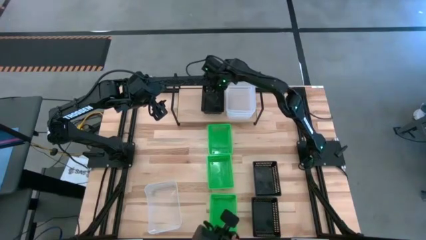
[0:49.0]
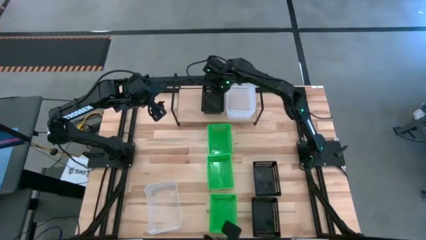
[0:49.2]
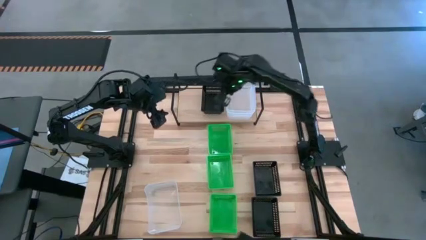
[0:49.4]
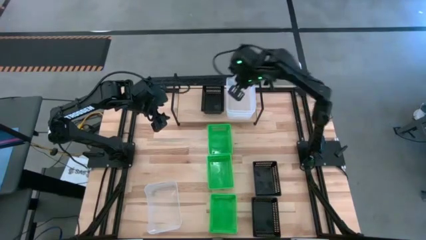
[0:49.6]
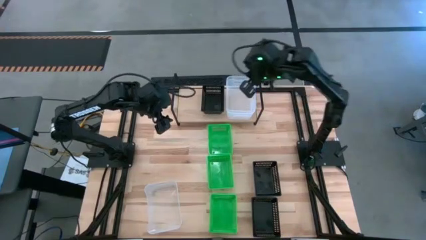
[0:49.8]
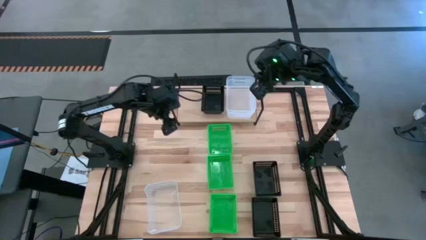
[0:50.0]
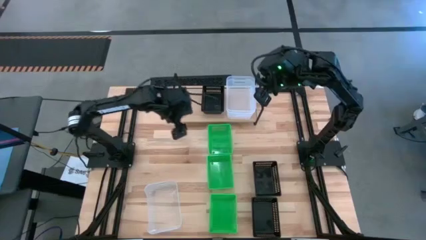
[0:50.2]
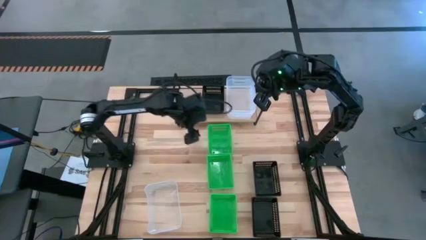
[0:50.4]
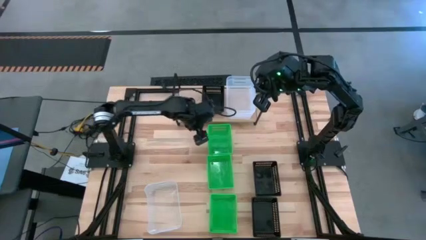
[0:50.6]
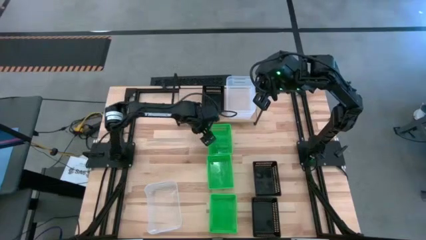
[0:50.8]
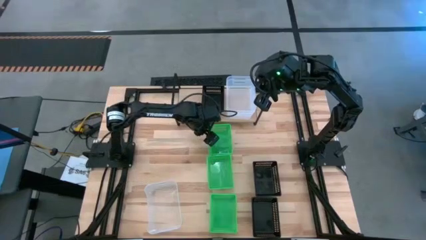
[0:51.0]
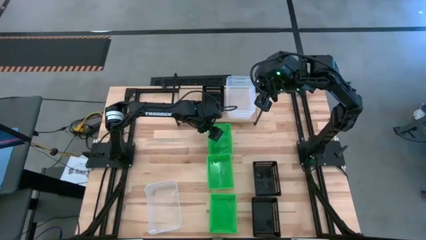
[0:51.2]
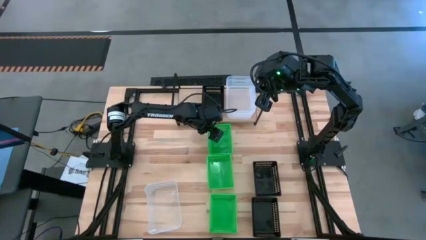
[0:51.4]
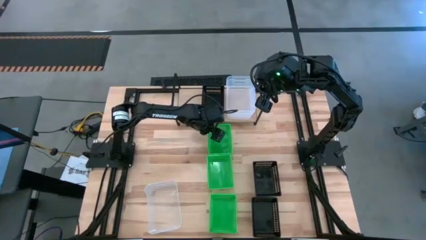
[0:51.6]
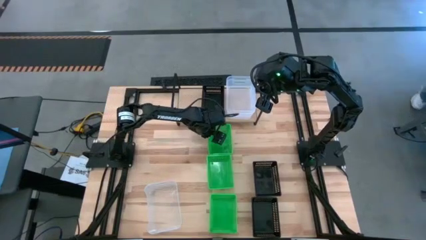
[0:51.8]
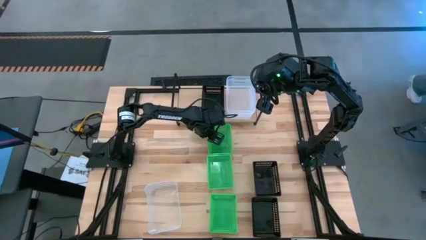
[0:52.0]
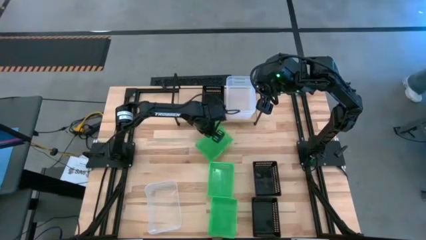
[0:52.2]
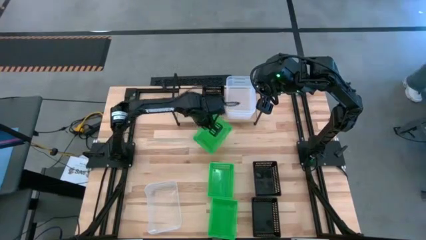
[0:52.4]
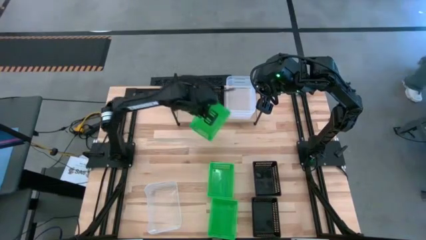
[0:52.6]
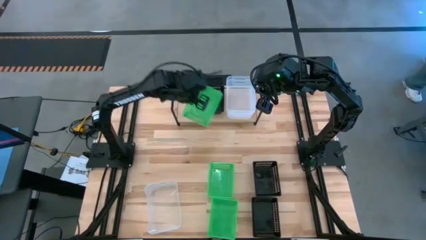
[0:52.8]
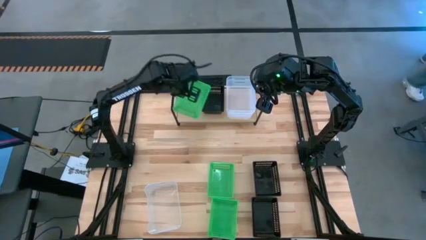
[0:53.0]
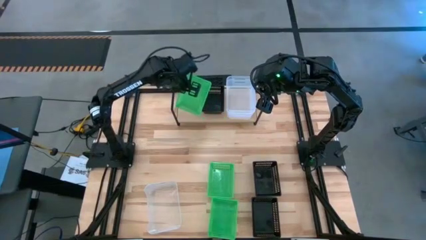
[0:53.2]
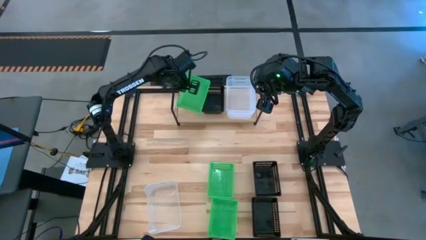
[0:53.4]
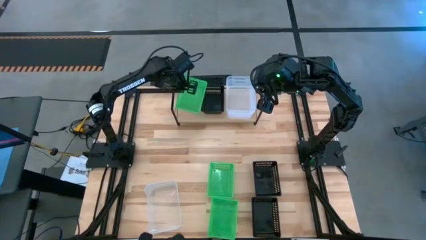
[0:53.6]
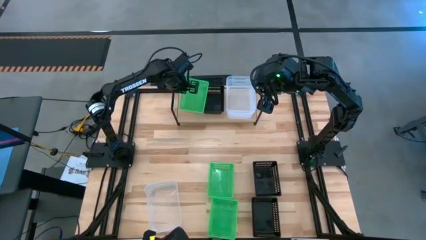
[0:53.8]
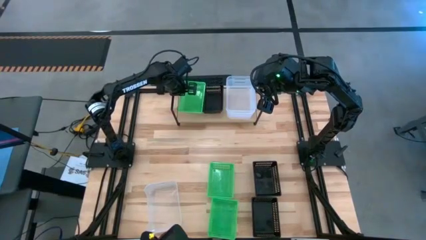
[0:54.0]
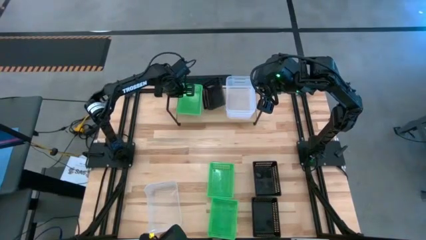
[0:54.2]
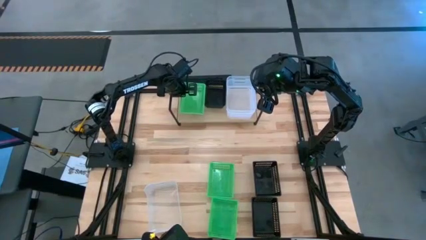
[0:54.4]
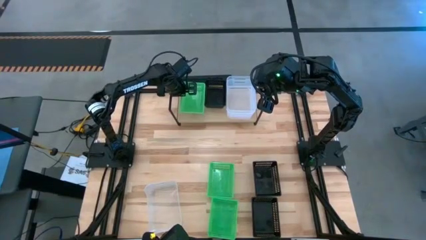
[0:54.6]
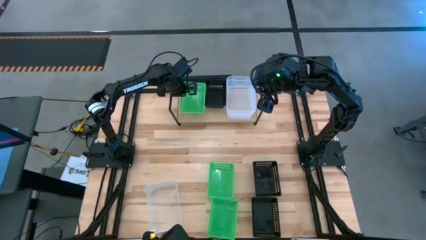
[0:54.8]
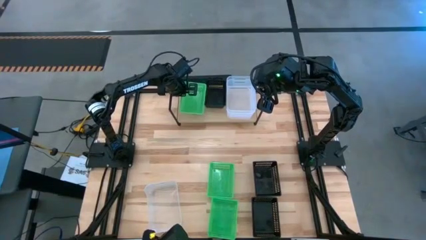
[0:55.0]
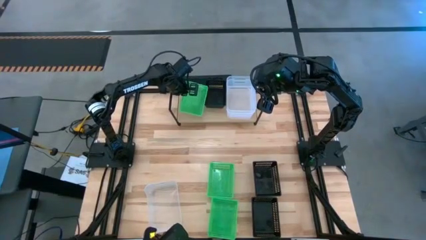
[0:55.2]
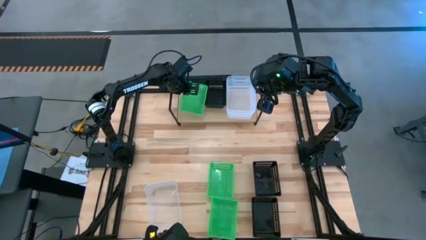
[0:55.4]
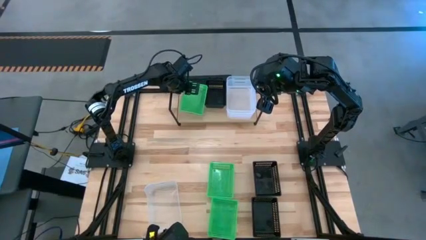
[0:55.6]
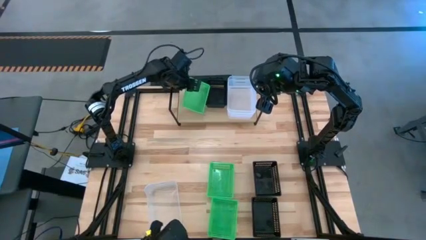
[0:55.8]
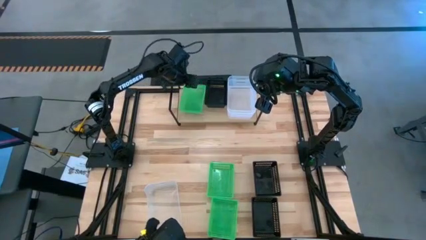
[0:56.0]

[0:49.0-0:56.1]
Task: Stack baskets on shelf by color
Put the top green bin on the shelf

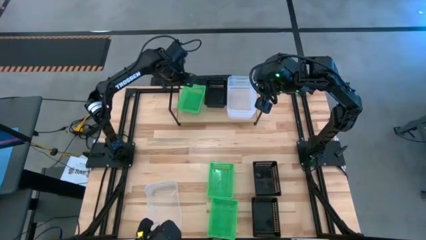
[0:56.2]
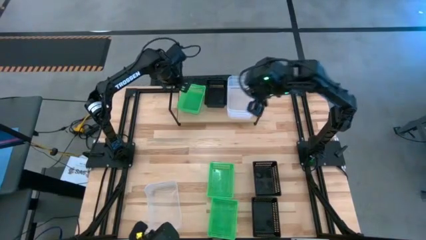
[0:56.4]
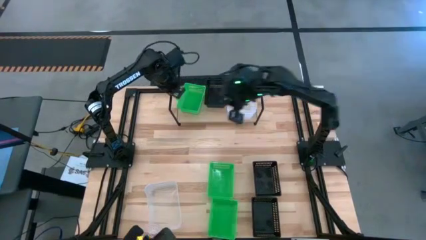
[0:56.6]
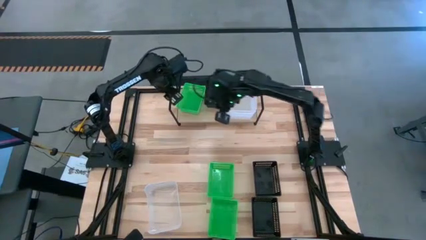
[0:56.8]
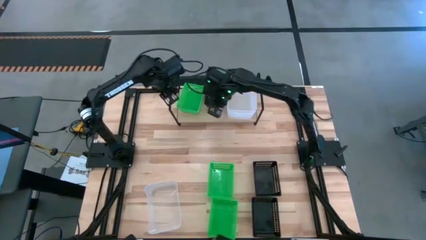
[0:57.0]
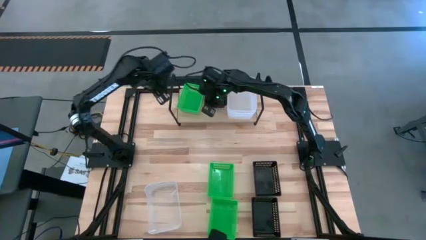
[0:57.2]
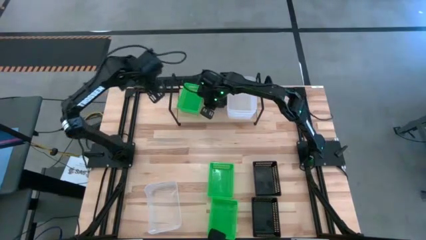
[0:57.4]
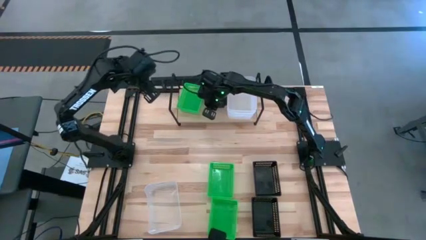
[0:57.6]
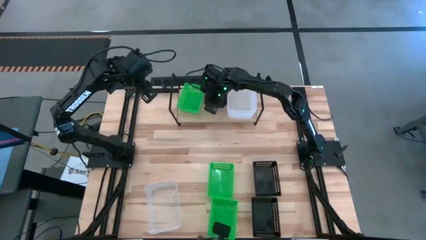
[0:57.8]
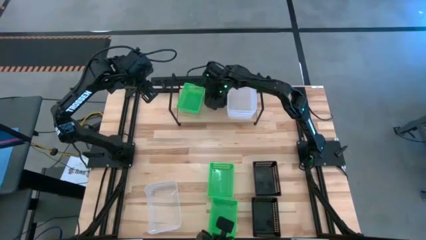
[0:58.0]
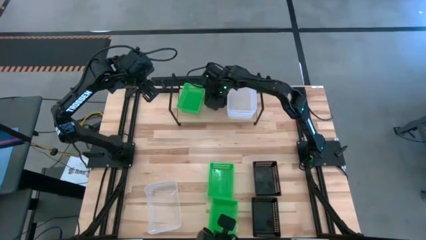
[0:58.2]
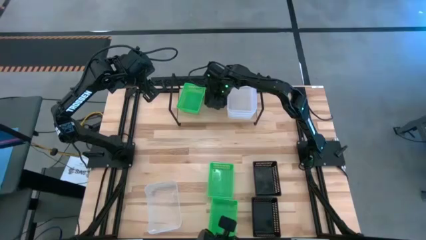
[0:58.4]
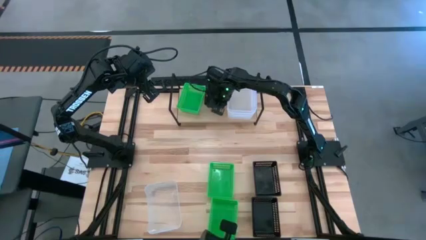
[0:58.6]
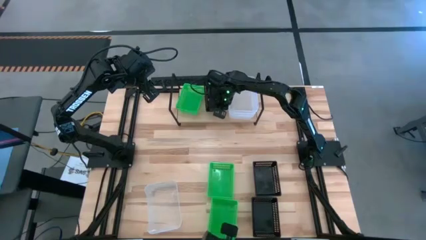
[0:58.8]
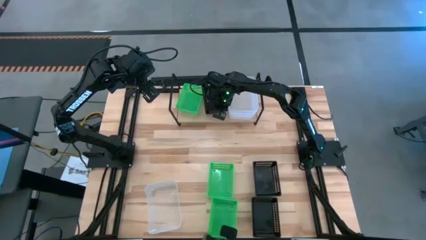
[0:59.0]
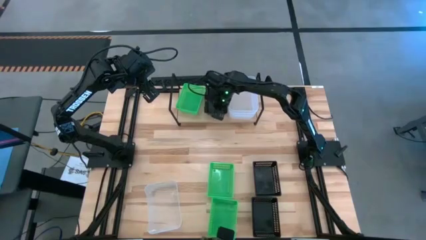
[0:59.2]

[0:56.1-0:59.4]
Adjust the black bin on the shelf
